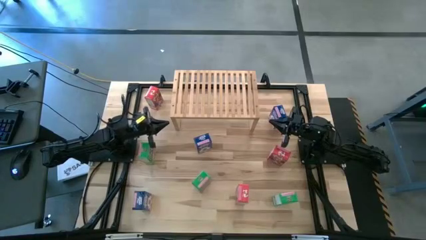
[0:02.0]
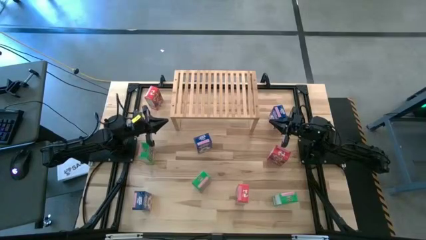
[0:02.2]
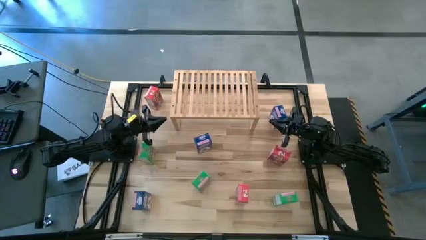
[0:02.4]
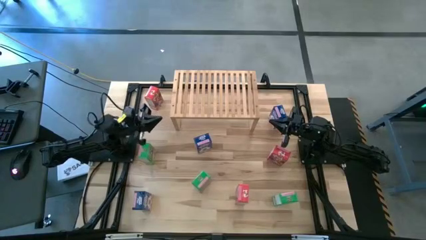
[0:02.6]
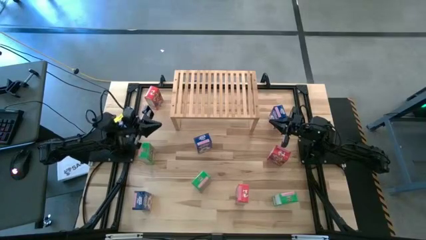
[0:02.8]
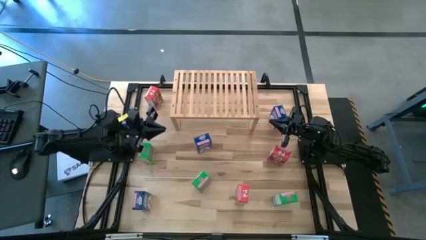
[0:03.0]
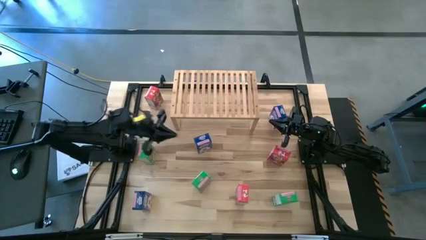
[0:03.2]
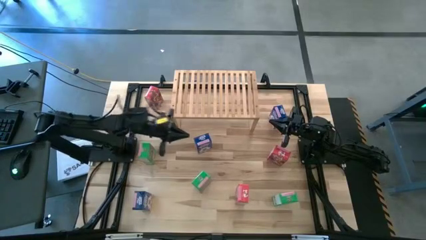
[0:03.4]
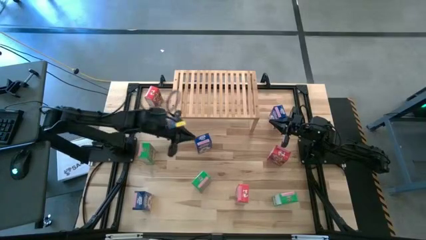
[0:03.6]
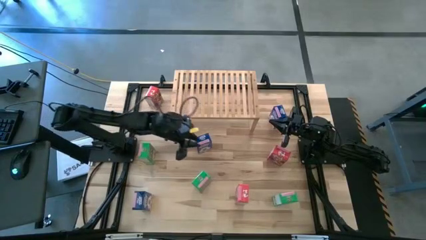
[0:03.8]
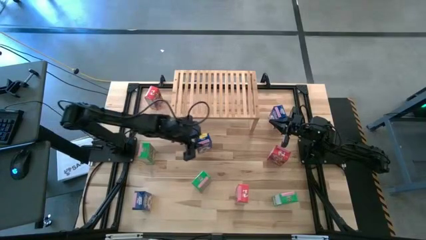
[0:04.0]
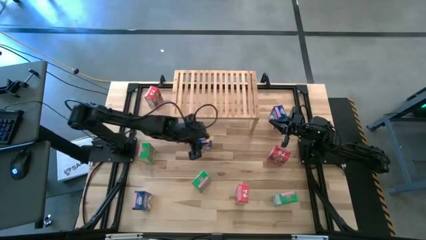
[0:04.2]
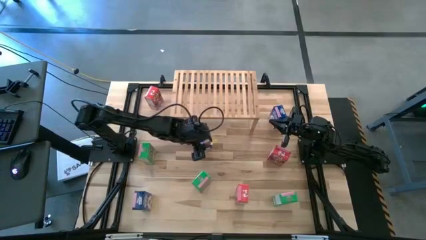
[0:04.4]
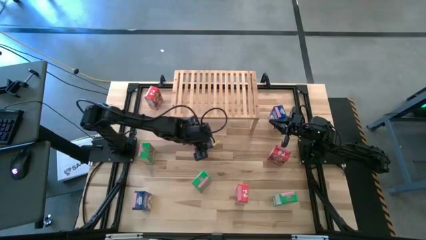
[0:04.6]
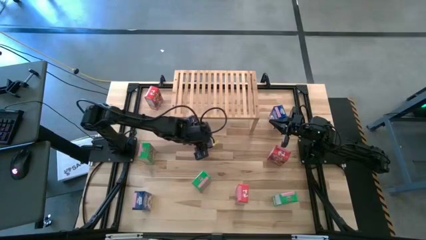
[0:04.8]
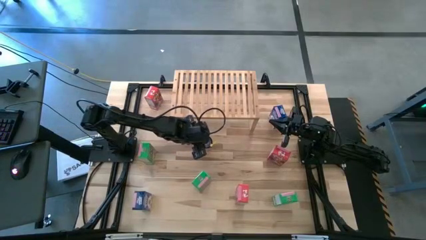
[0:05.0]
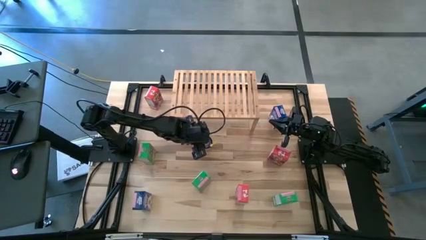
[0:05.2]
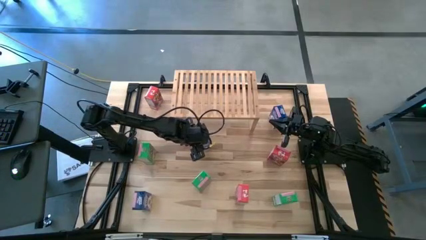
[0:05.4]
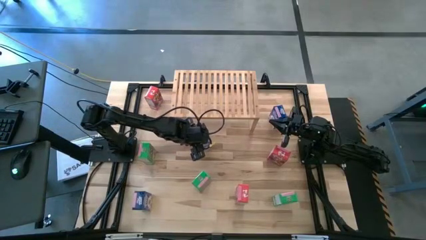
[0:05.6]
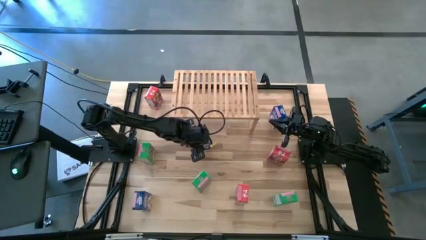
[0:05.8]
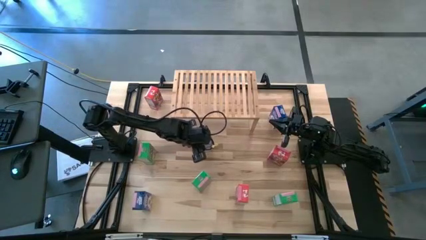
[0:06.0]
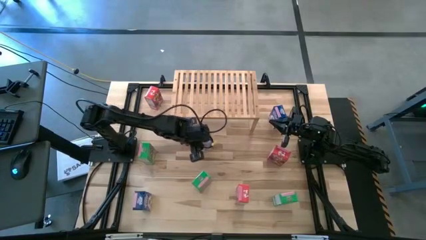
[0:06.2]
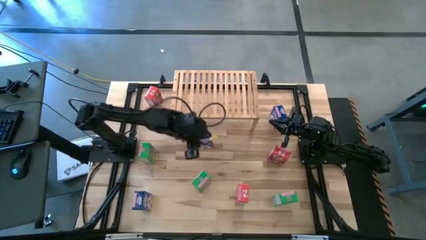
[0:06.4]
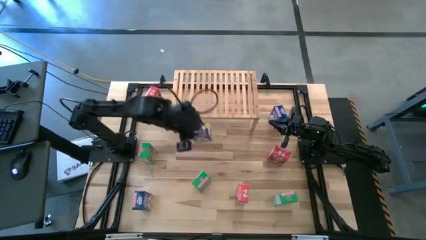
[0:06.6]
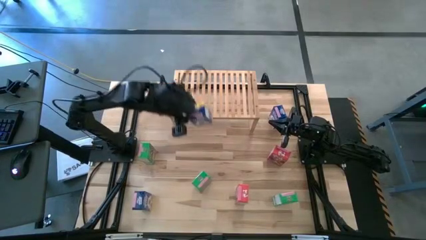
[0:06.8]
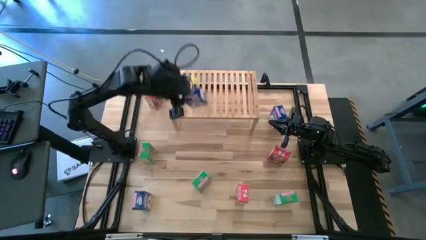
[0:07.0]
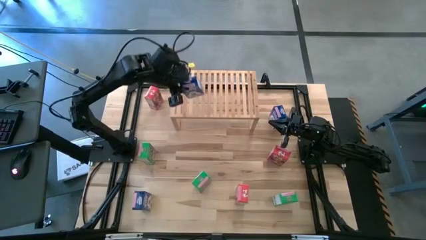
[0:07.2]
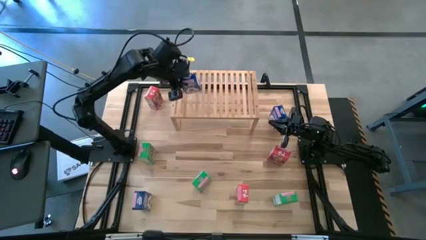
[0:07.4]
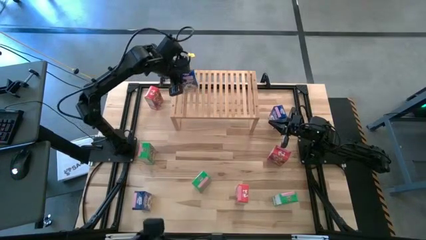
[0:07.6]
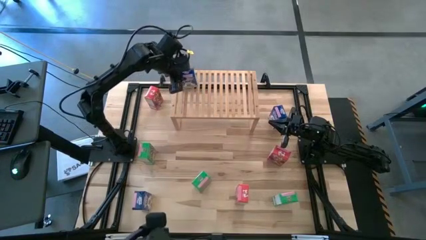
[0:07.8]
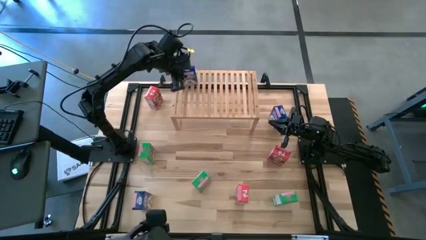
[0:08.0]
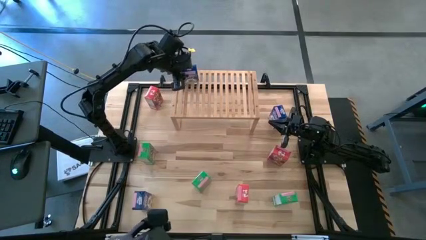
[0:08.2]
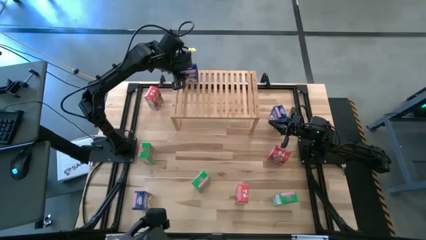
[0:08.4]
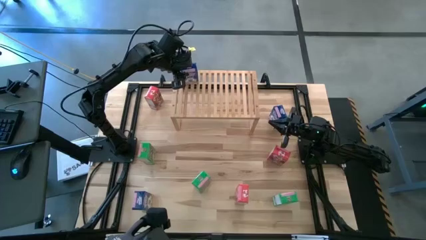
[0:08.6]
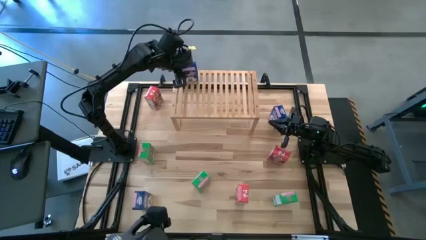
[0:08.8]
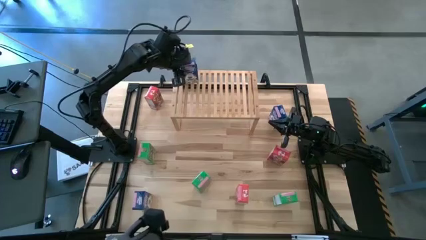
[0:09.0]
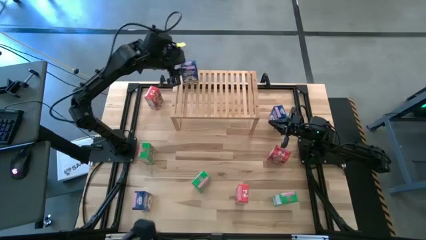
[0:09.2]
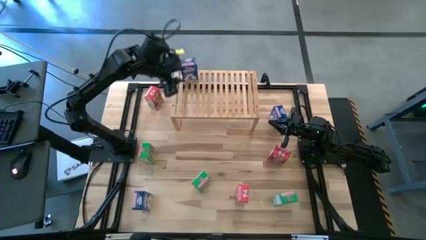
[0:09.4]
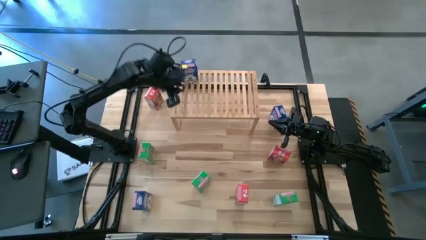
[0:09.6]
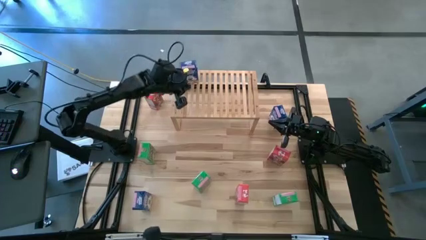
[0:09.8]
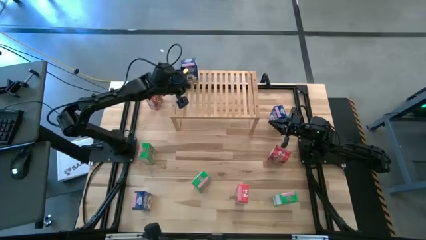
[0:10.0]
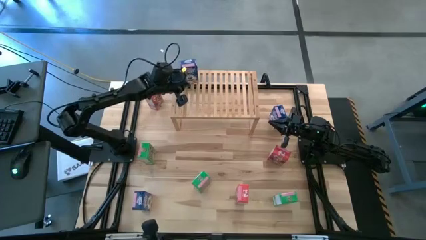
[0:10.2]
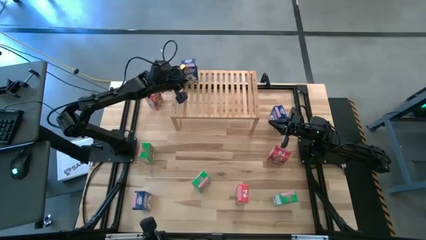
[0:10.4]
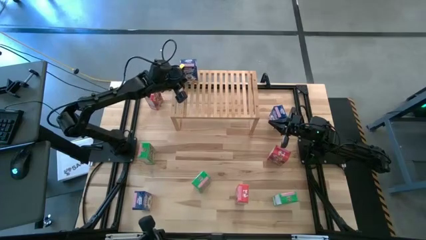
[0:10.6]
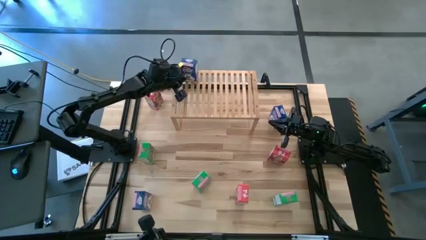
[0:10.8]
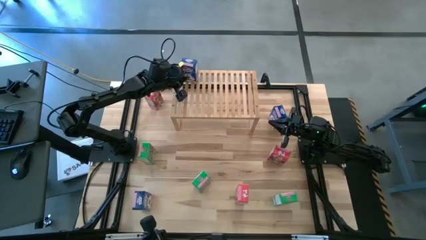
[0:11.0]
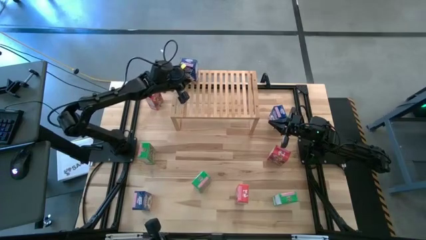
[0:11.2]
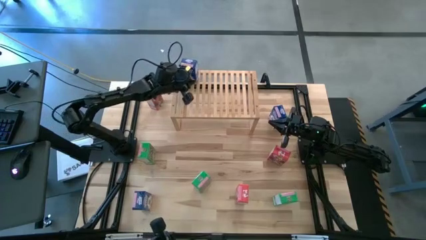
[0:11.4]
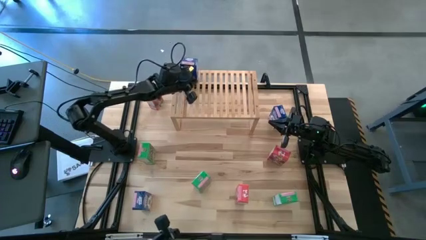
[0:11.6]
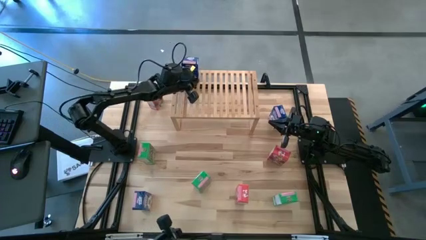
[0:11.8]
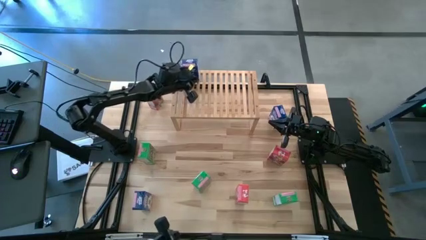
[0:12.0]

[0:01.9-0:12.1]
Task: Stack cereal on shelf
Put the middle blue cereal box on the shelf
